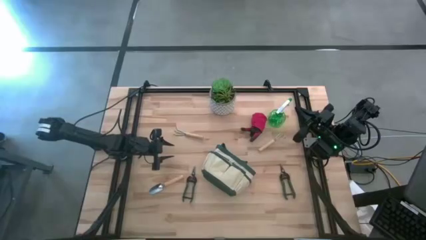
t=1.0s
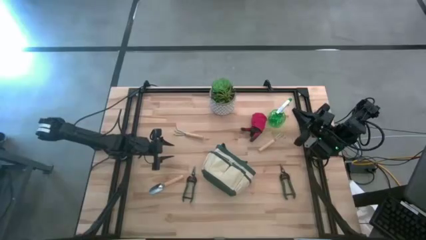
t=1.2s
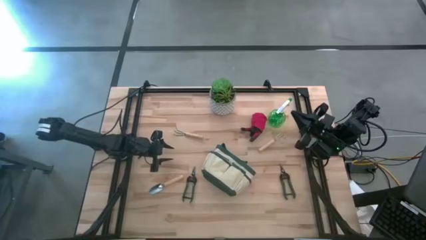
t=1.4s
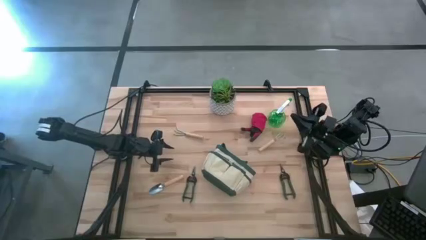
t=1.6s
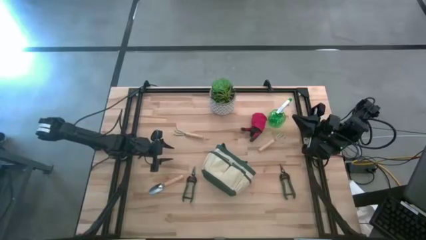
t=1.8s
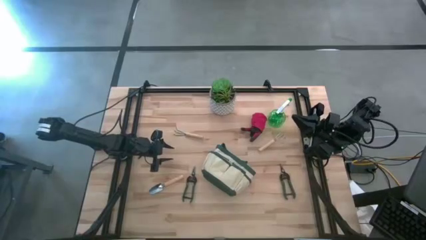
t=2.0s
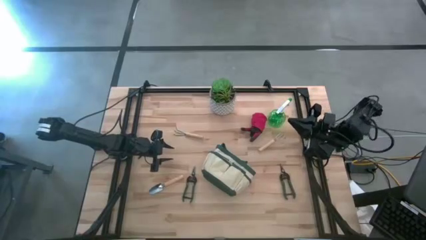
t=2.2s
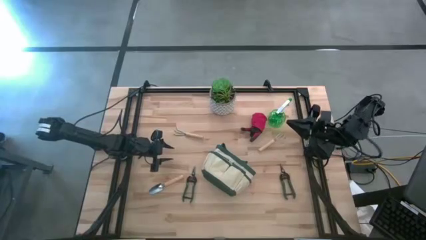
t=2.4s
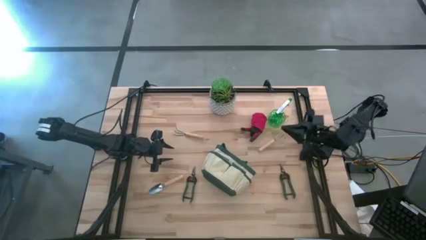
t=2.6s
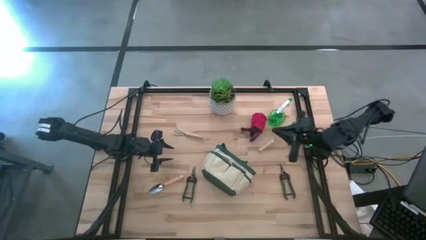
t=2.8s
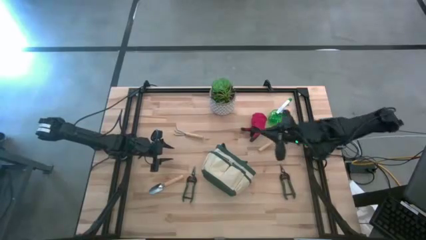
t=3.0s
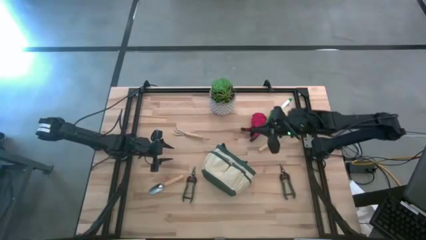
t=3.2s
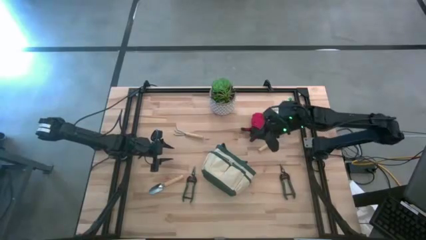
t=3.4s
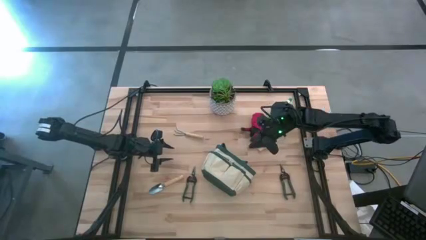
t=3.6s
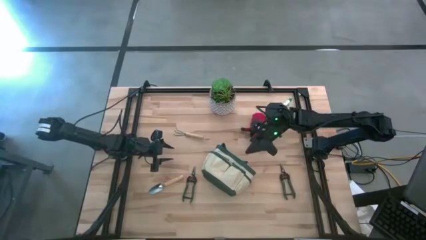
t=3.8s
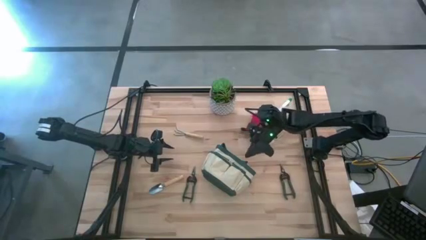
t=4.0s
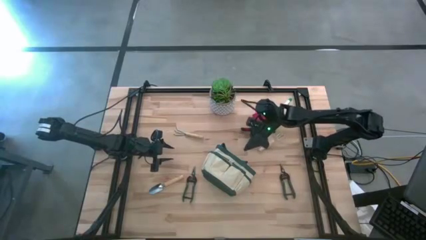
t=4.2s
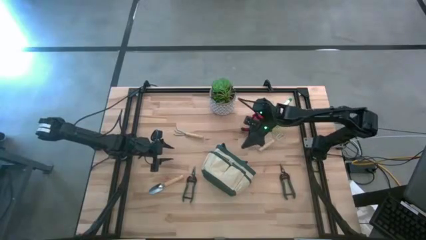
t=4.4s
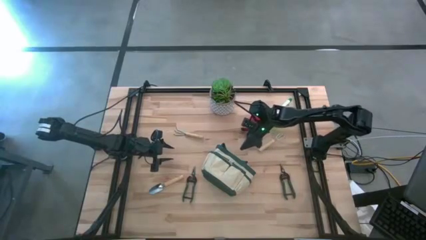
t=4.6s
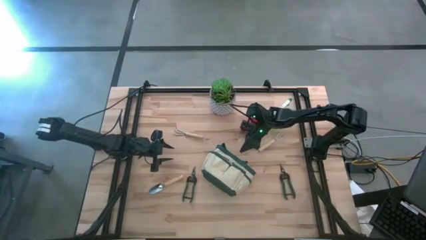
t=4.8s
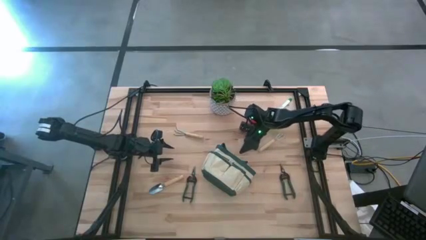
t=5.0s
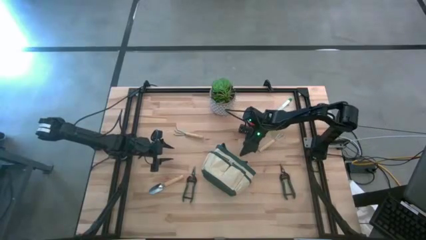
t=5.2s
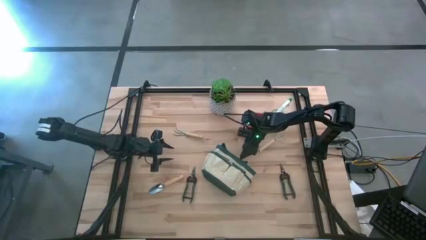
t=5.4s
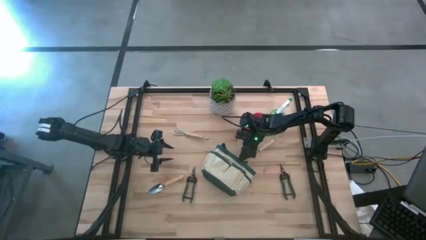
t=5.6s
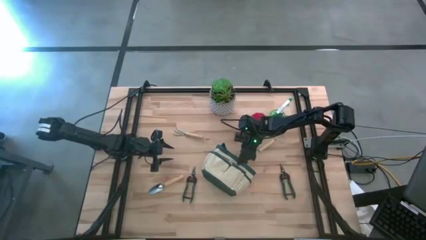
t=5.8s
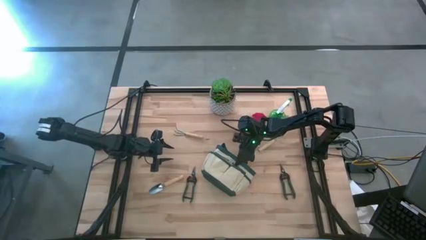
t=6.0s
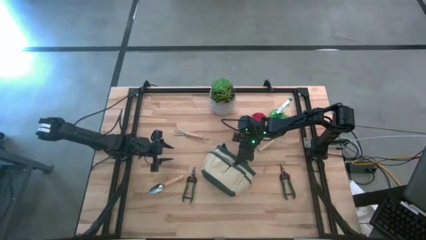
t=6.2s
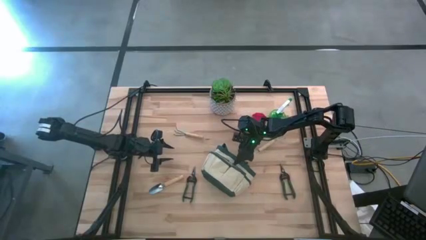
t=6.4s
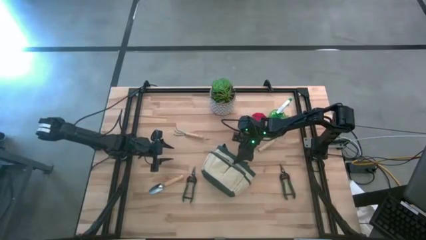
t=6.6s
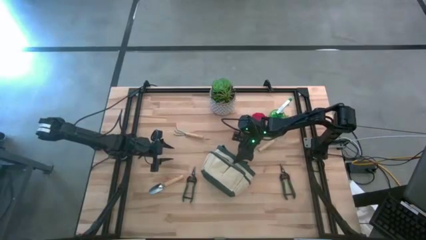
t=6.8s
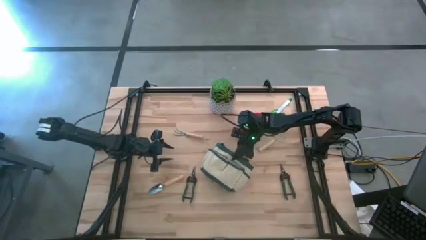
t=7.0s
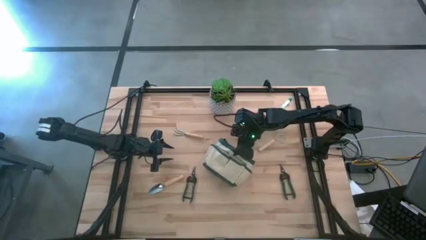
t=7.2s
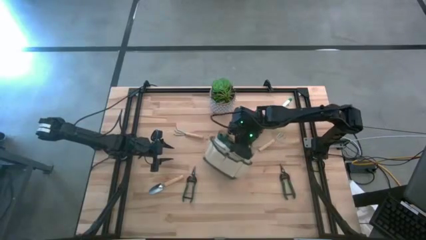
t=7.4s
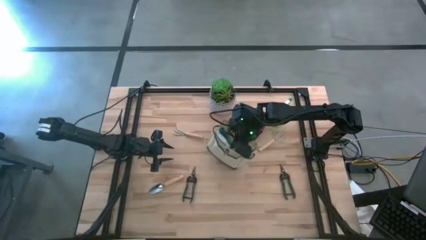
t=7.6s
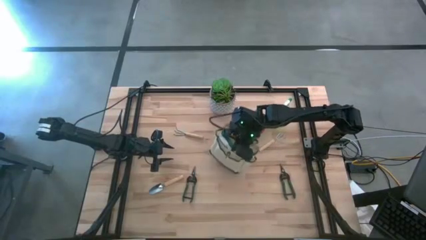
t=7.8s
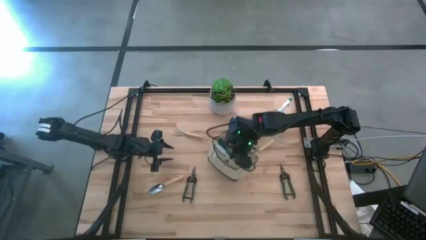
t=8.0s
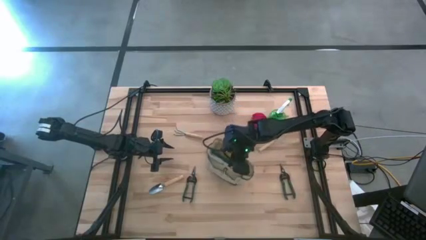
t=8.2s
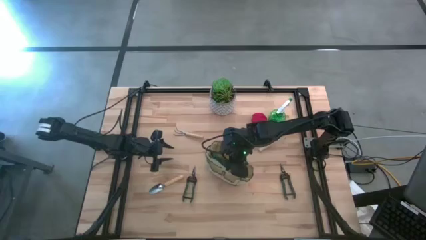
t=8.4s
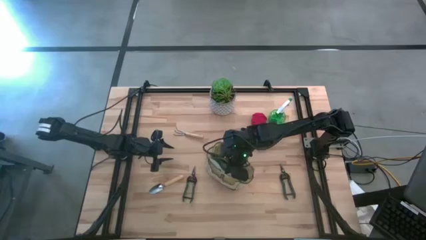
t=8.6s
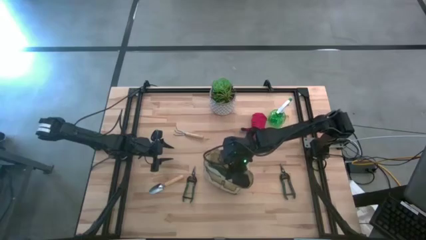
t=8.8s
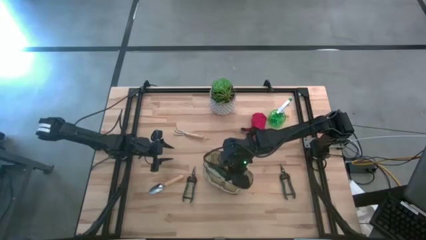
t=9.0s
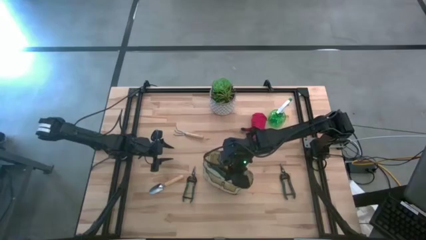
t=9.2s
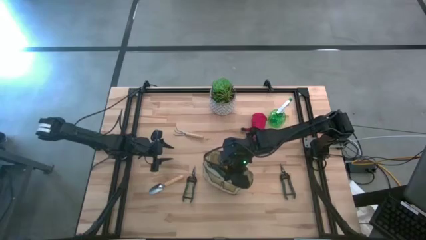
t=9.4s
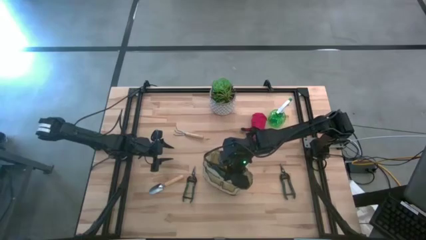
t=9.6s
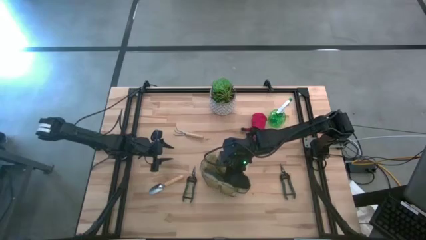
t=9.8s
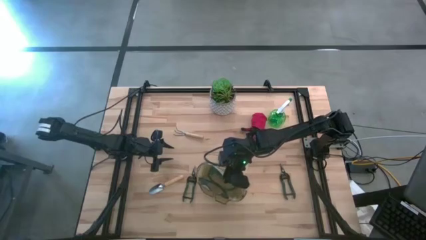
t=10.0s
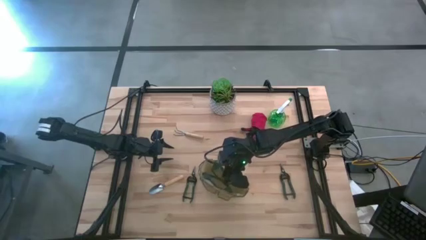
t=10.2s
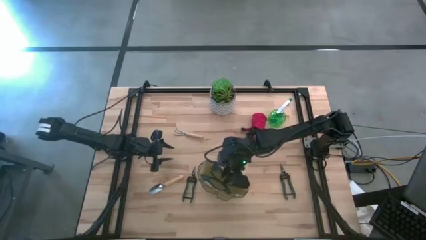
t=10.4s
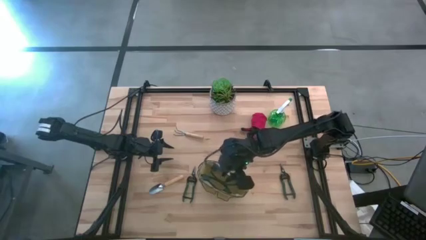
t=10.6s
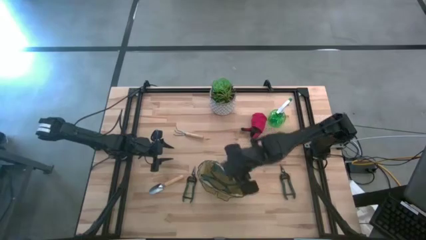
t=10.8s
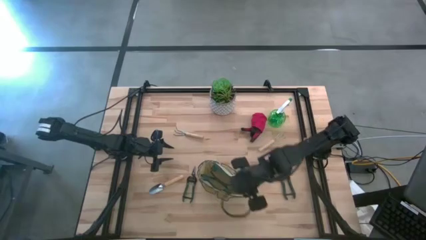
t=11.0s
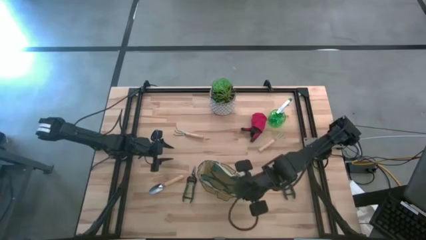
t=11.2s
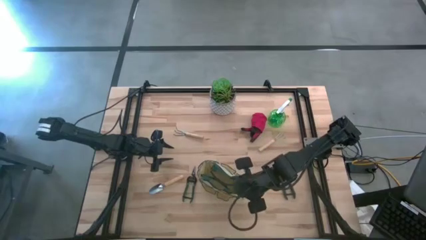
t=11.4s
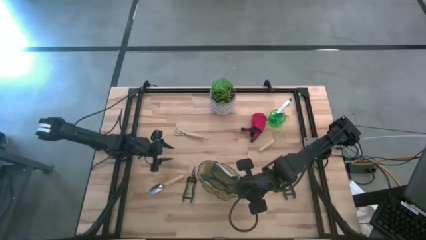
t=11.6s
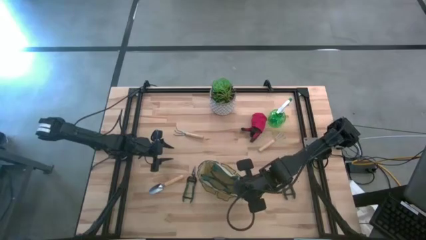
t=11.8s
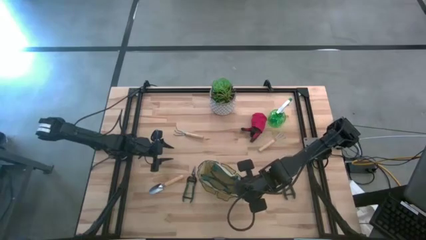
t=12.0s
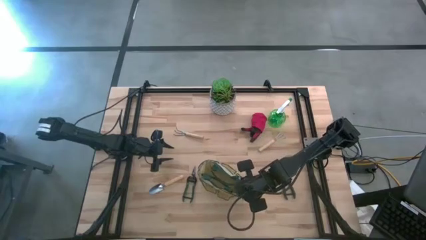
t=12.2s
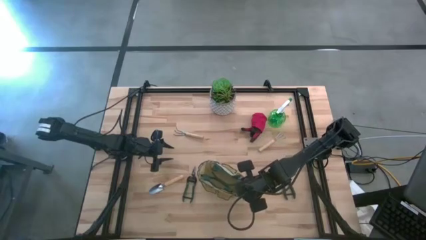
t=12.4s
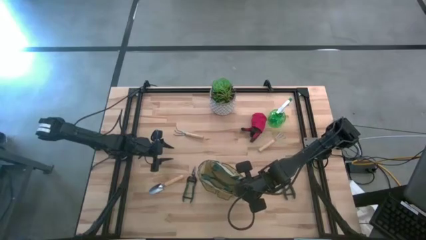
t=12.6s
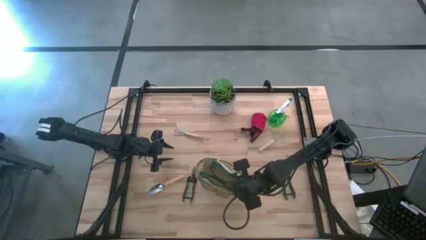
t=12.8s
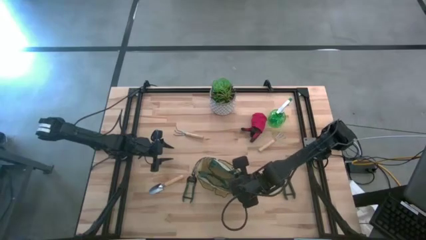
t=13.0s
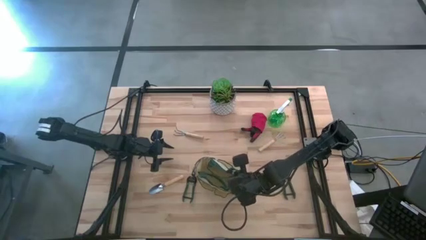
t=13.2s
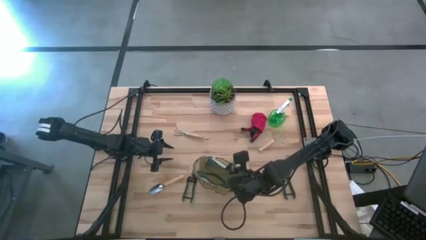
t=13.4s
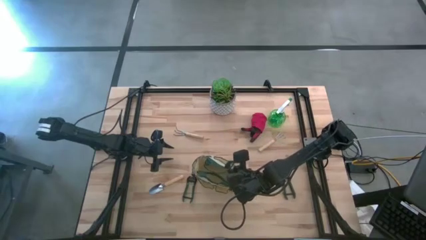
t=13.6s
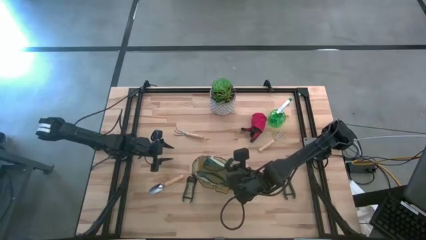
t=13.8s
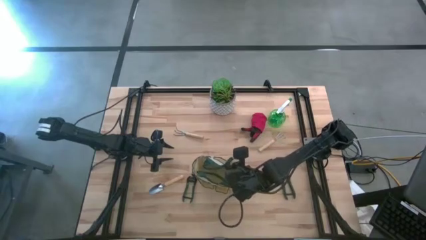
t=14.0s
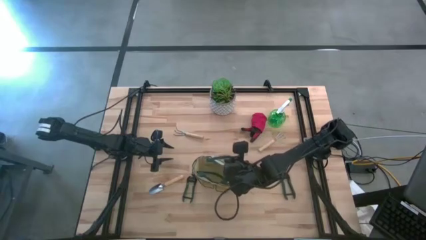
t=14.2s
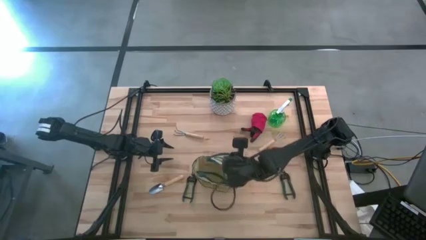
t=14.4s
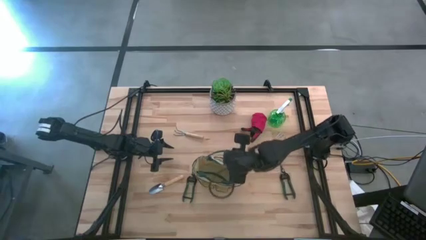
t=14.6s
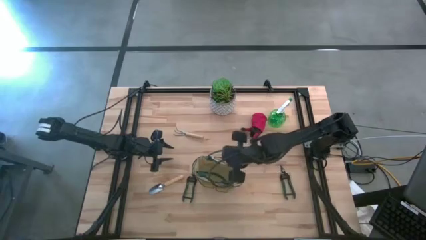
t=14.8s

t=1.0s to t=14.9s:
Task: Pick & Place Garden tools in Gardening bag
Put the white gardening bag on the table upright
